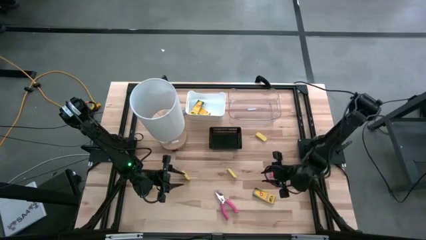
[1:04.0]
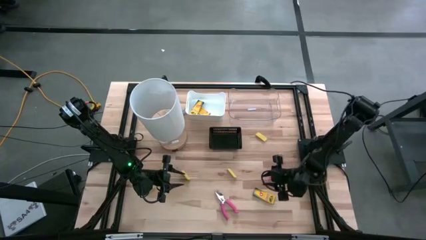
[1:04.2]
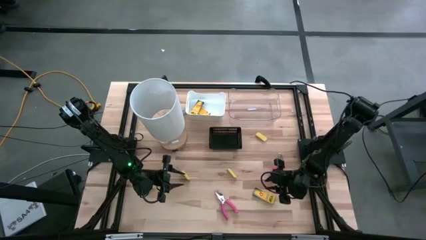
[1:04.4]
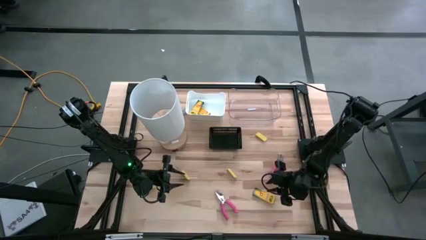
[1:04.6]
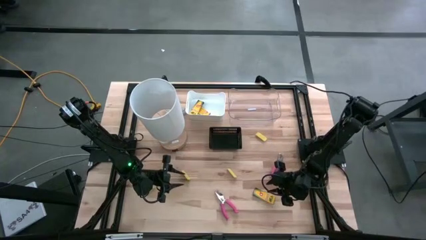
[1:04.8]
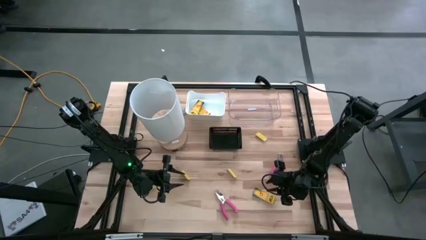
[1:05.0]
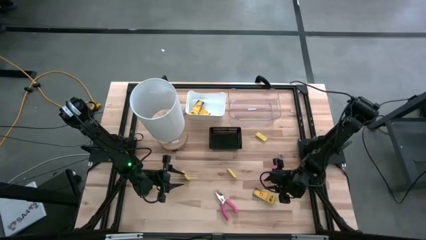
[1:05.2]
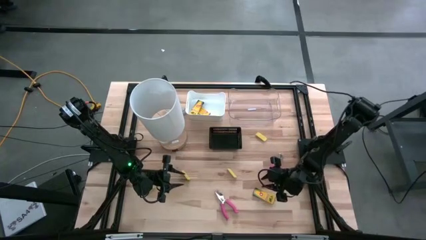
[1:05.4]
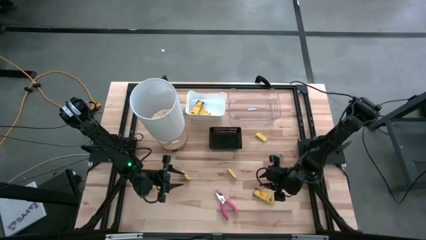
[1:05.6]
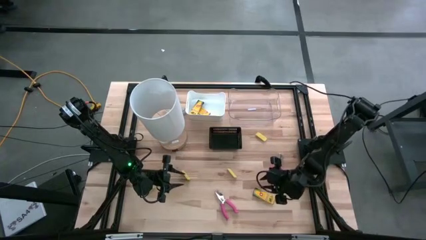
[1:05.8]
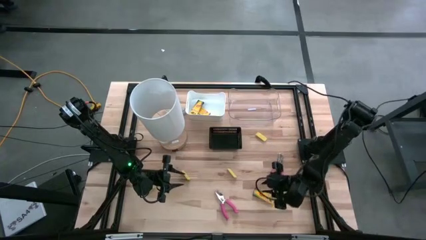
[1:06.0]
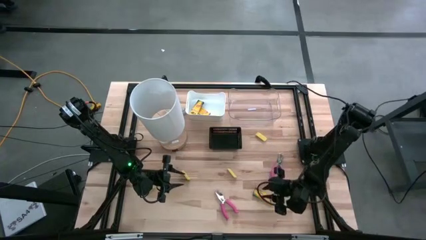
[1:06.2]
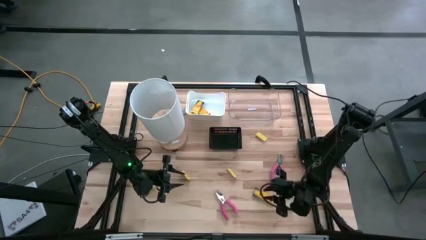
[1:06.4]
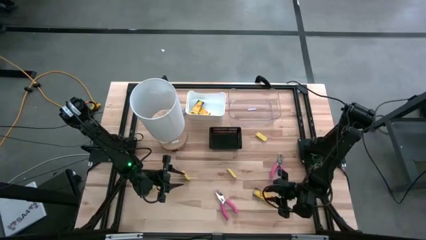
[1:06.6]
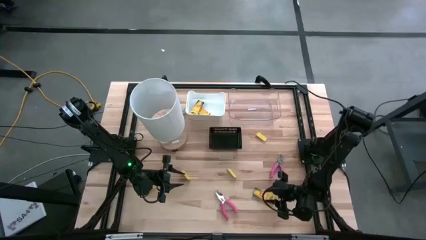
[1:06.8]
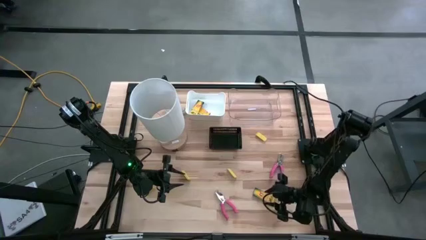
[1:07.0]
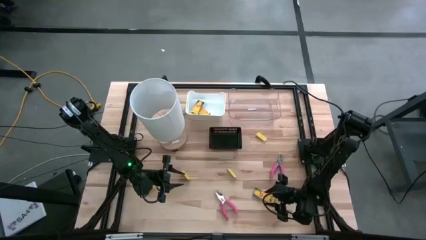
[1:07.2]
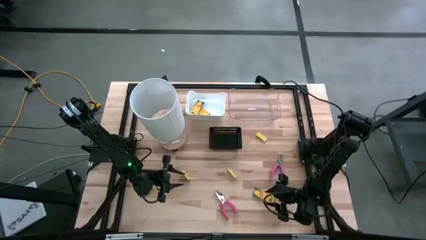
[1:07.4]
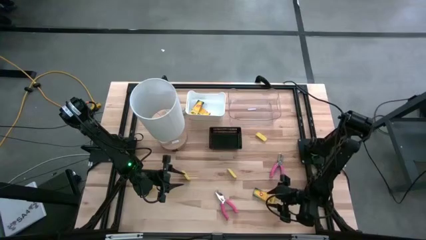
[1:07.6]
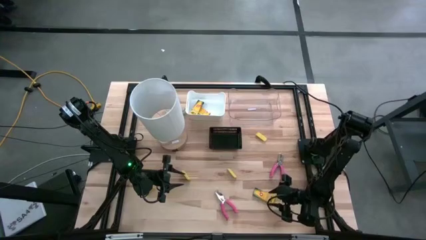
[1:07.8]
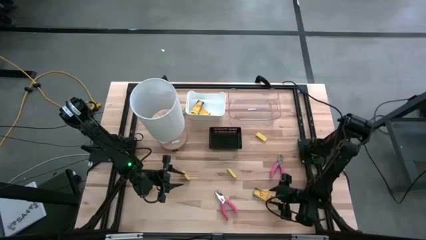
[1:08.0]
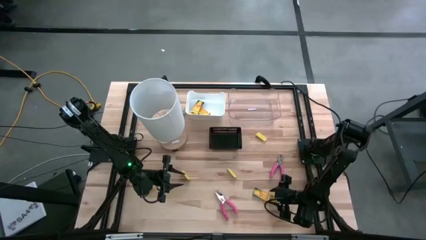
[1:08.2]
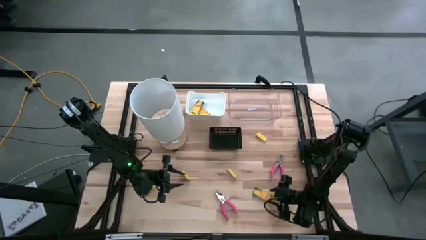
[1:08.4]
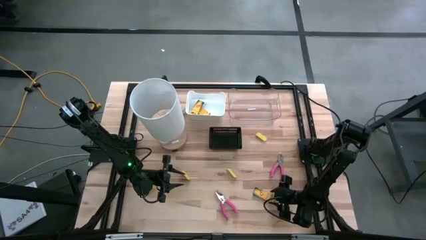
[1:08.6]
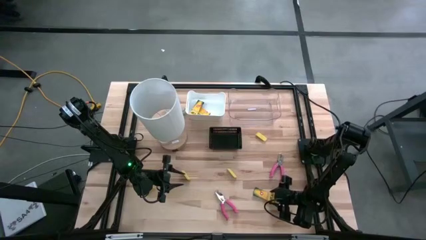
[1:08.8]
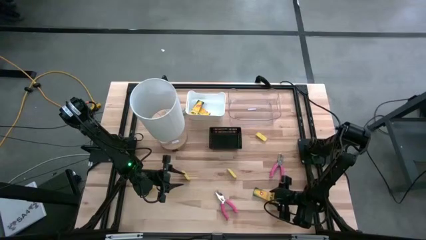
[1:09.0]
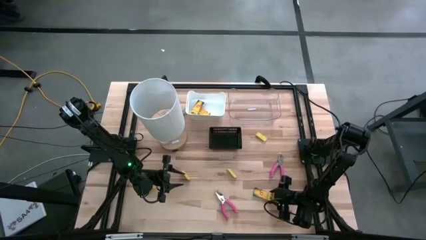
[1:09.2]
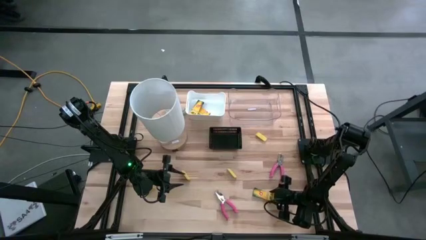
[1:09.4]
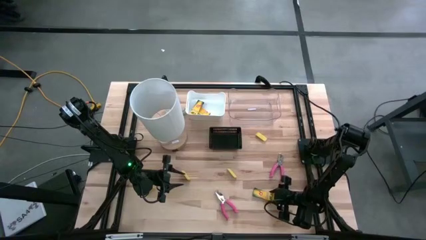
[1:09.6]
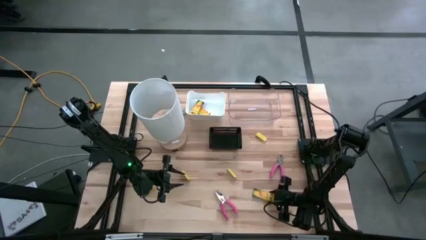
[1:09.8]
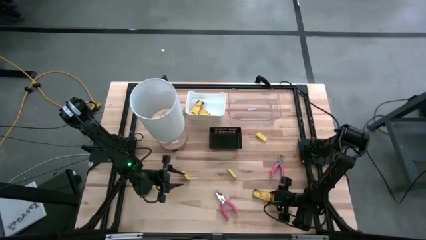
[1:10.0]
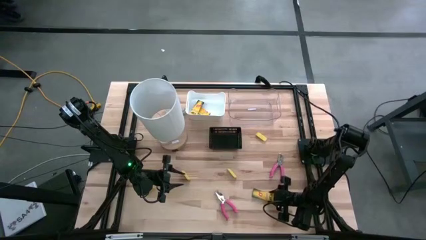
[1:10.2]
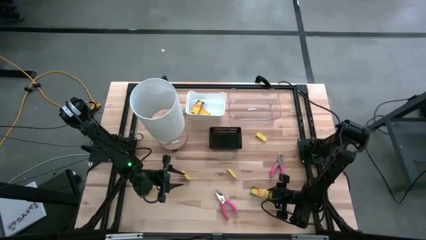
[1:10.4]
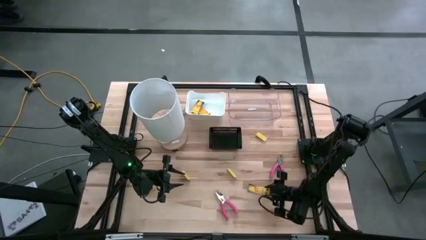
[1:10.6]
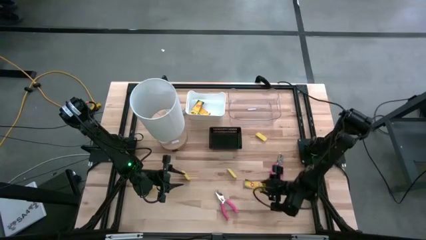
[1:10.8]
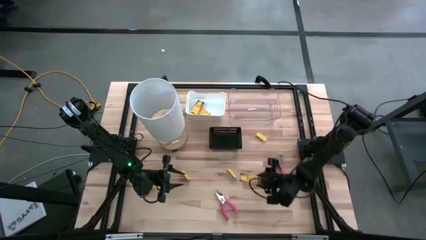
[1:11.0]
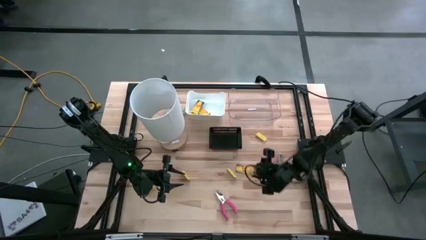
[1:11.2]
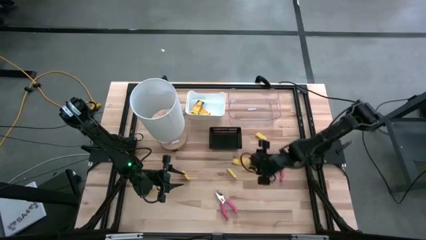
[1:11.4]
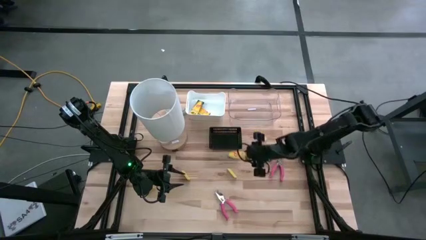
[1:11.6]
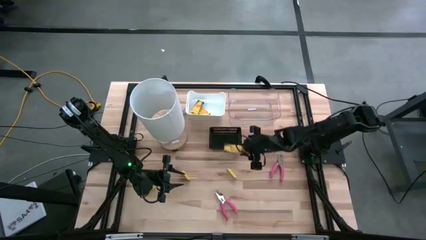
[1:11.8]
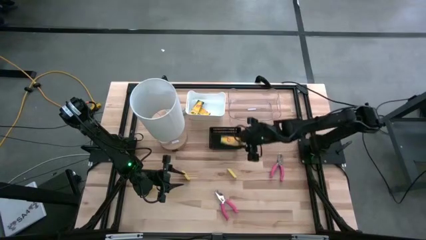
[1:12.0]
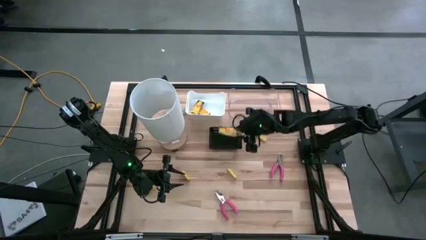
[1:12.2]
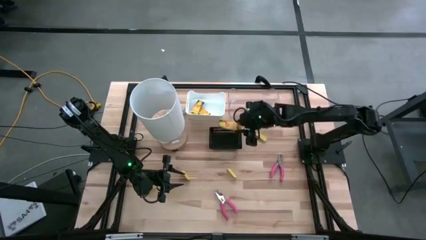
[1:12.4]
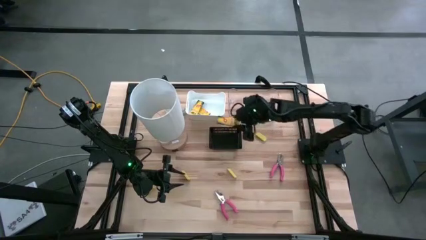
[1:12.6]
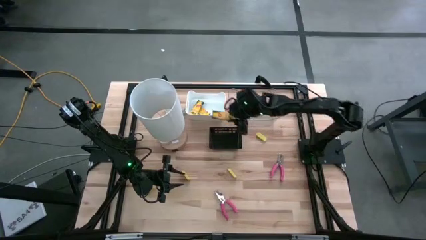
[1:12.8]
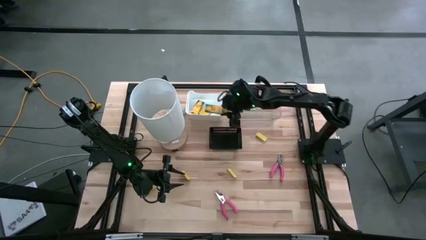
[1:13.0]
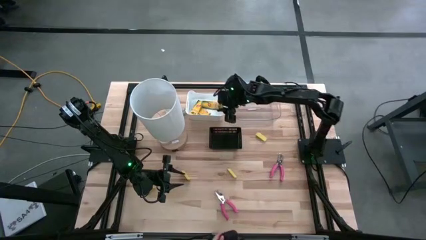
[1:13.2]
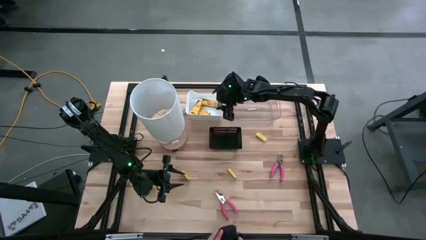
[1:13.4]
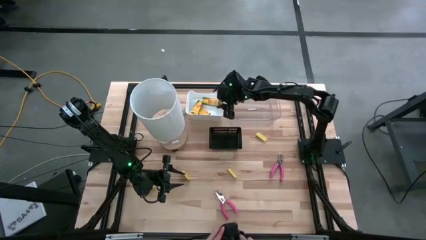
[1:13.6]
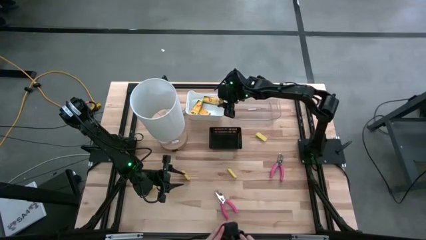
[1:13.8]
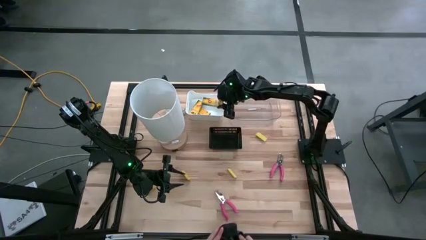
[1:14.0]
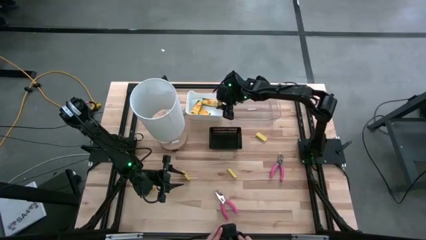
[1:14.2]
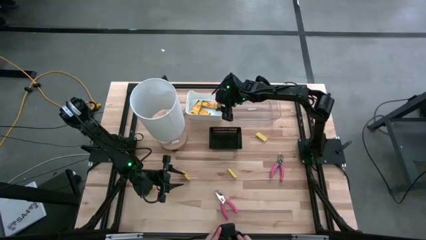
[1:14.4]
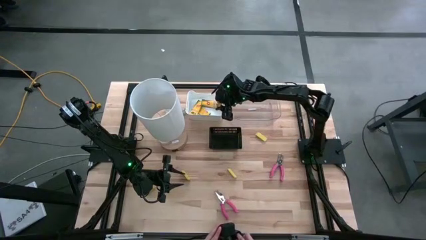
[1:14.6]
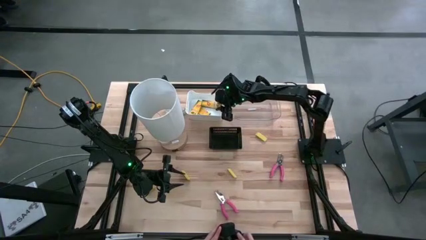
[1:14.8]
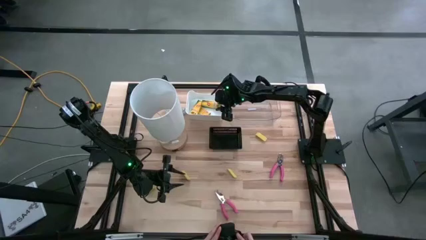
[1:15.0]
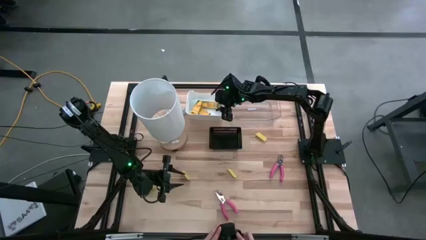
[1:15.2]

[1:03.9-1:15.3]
Task: Pick & Place School Supplies
Put the yellow crayon box into the white bin

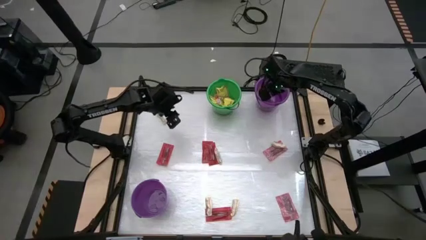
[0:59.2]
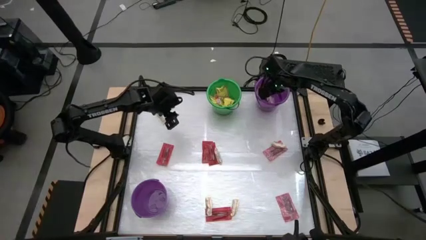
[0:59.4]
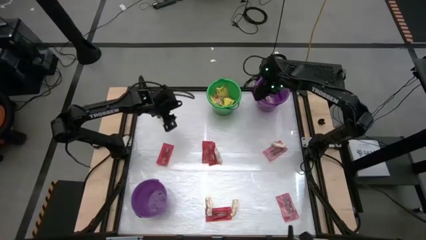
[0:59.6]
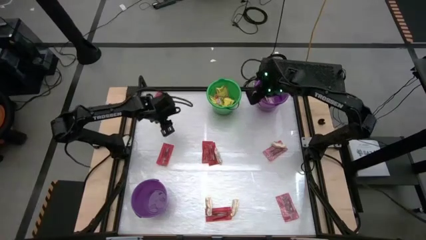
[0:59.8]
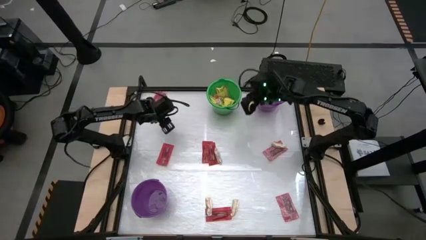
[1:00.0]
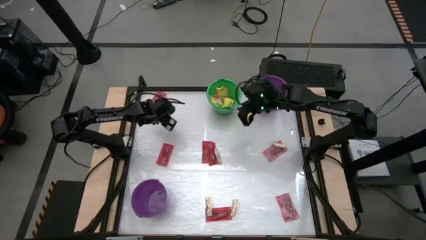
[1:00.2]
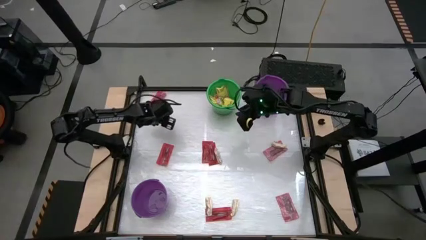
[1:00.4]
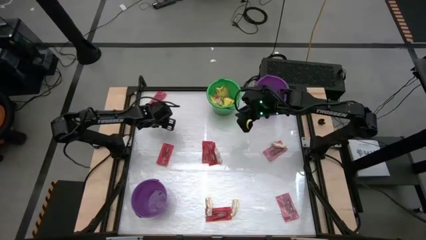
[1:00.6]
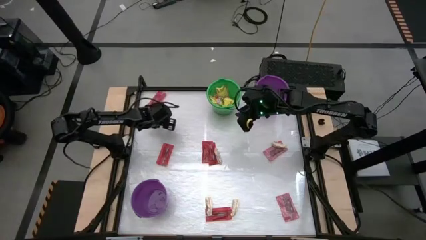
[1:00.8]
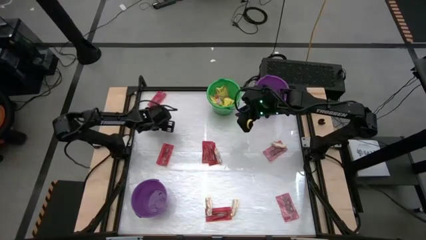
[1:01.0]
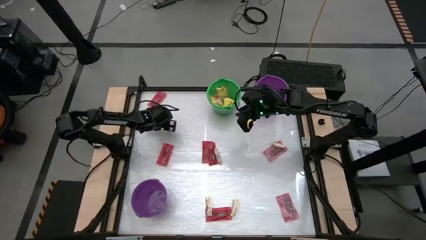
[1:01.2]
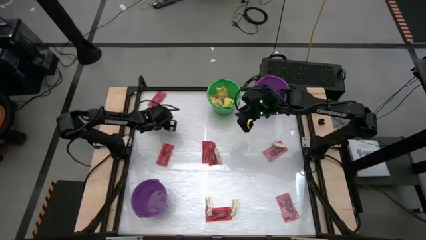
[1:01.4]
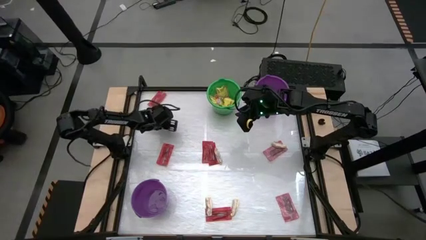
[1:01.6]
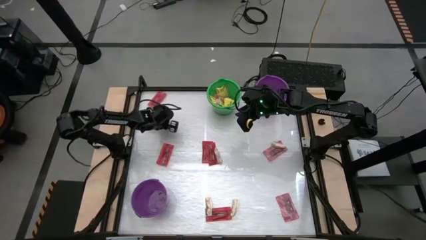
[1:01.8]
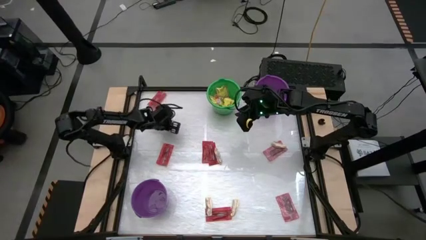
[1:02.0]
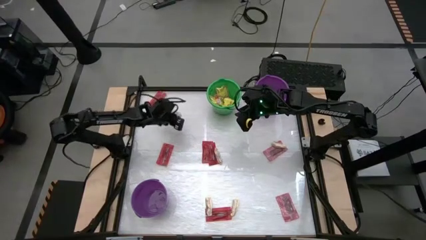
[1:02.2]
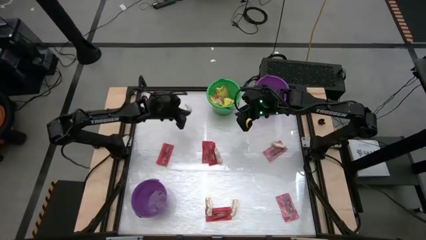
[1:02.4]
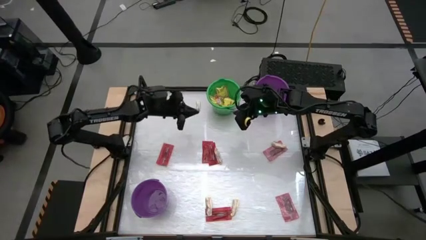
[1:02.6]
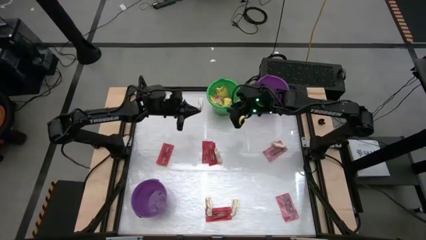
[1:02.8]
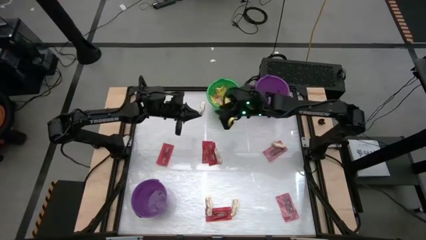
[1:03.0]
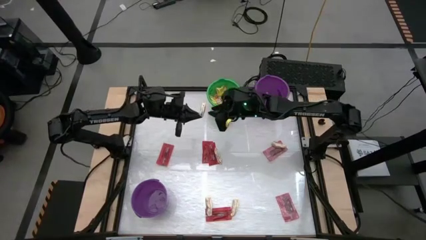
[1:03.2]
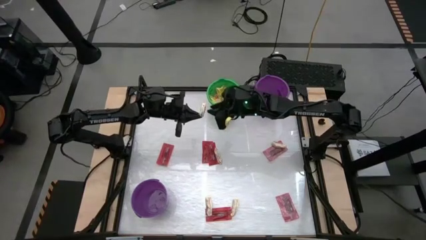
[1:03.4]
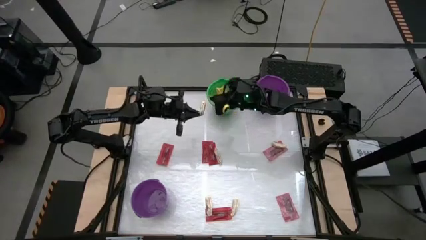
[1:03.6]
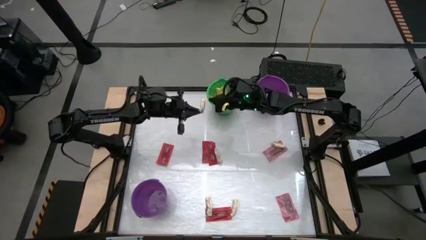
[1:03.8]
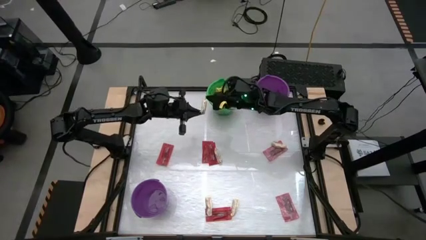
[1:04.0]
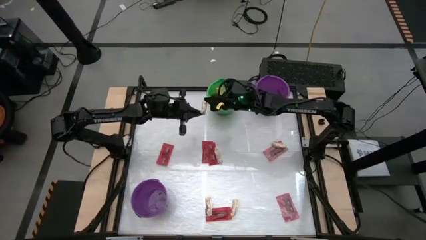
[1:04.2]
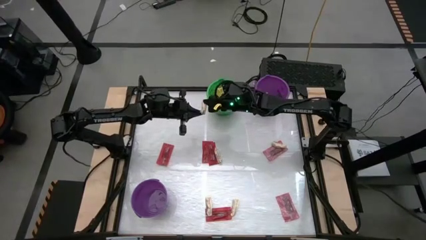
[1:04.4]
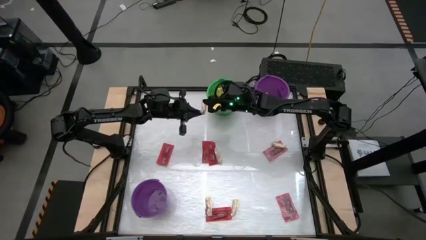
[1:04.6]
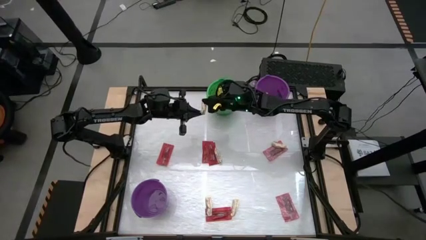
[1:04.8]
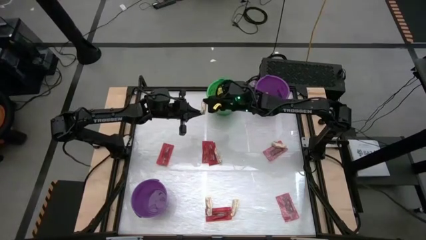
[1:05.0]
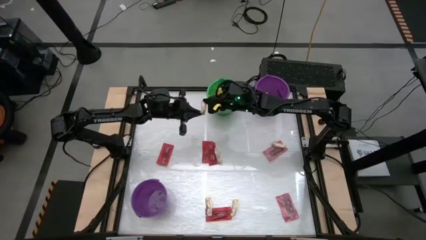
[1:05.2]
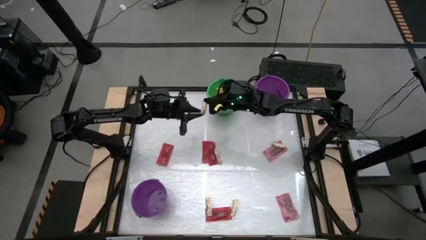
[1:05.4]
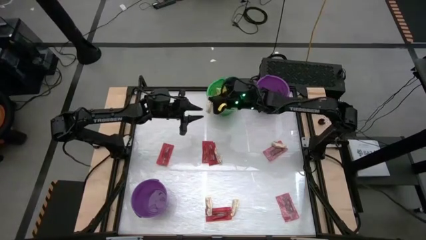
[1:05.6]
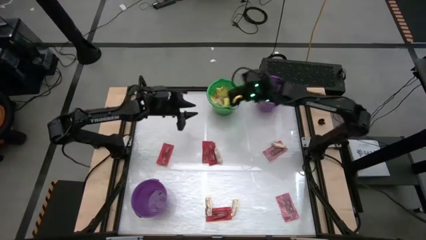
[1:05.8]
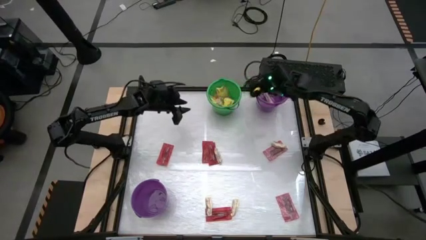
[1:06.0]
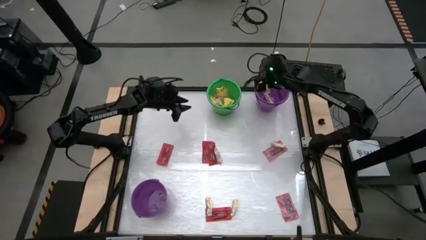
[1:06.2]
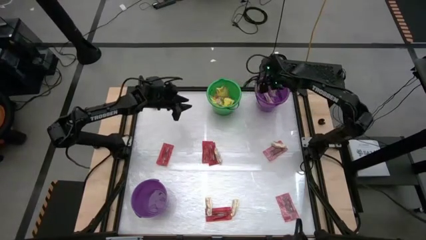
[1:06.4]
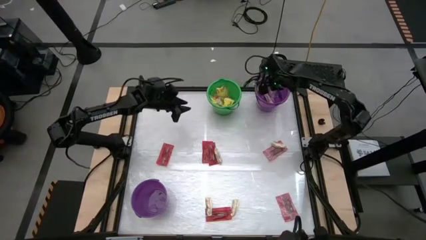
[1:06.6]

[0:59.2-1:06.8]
Task: Sort candy by brand, put in halloween buckets
Put the light brown chocolate bar into the top violet bucket
